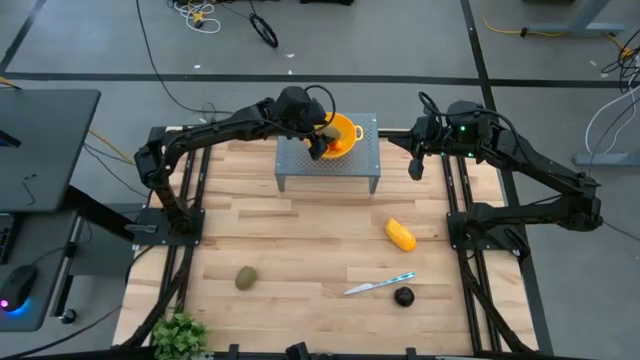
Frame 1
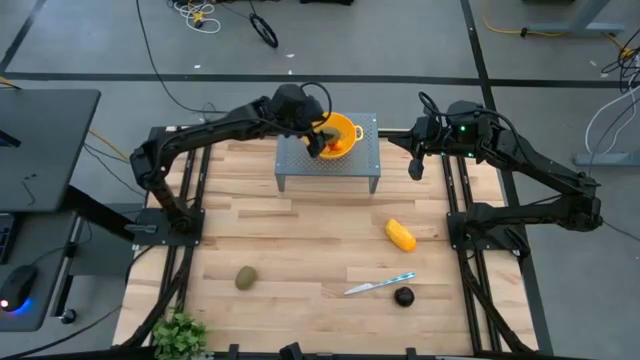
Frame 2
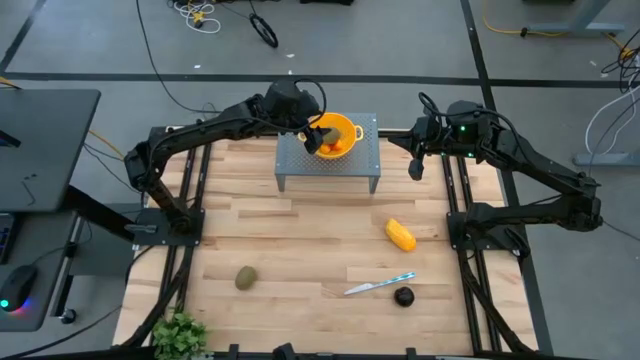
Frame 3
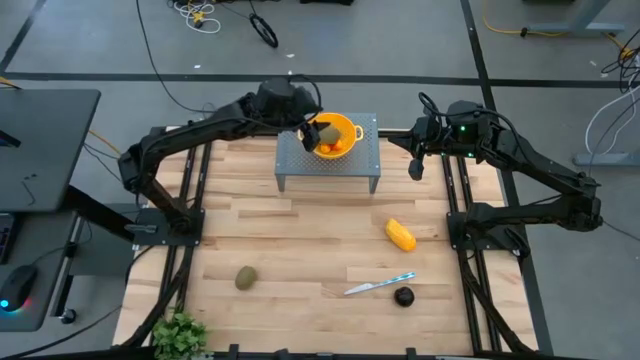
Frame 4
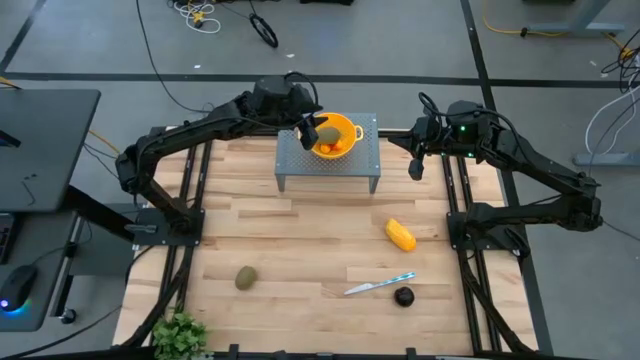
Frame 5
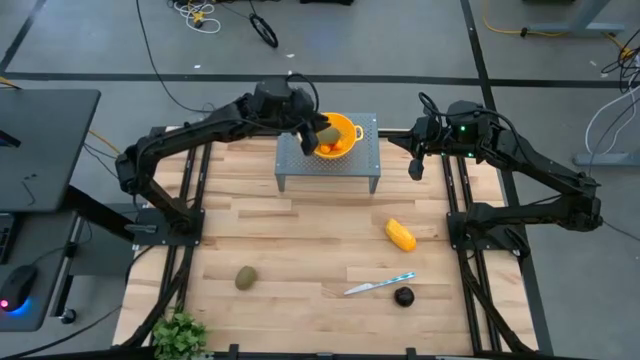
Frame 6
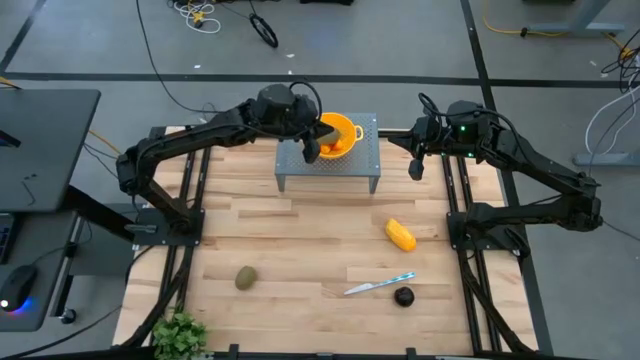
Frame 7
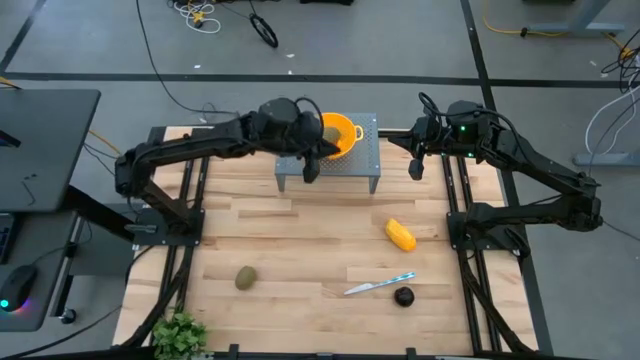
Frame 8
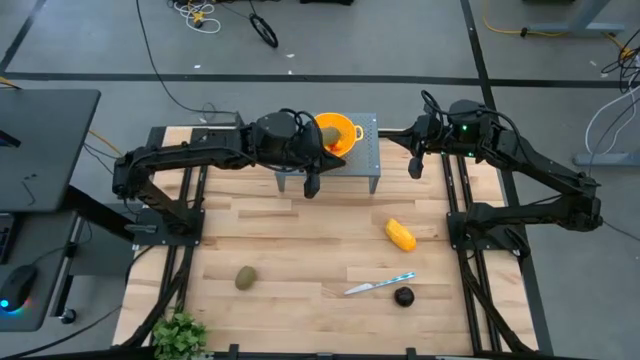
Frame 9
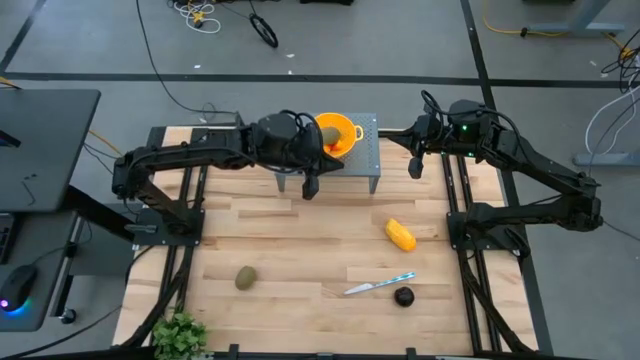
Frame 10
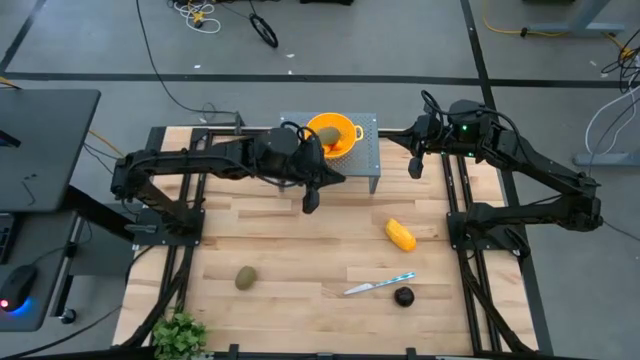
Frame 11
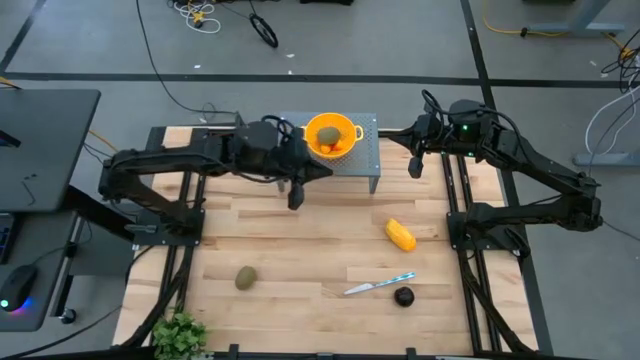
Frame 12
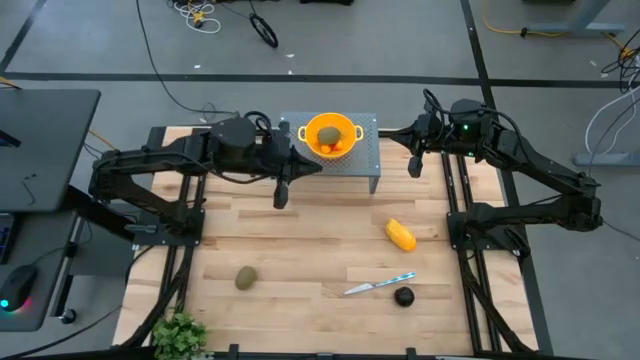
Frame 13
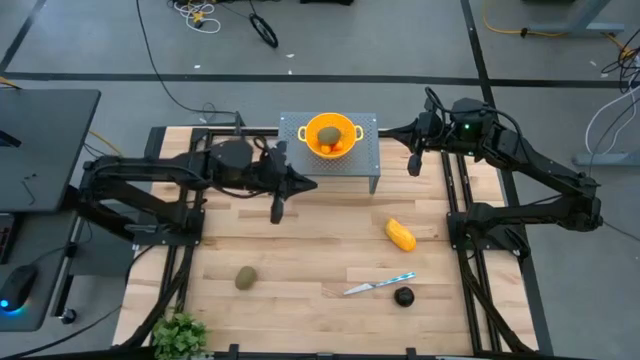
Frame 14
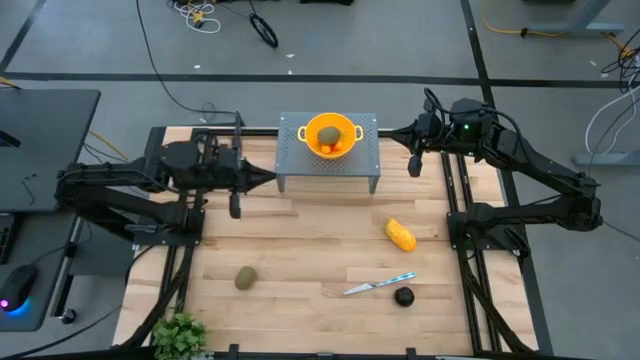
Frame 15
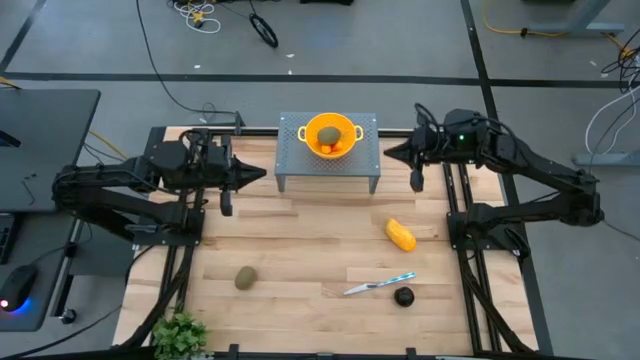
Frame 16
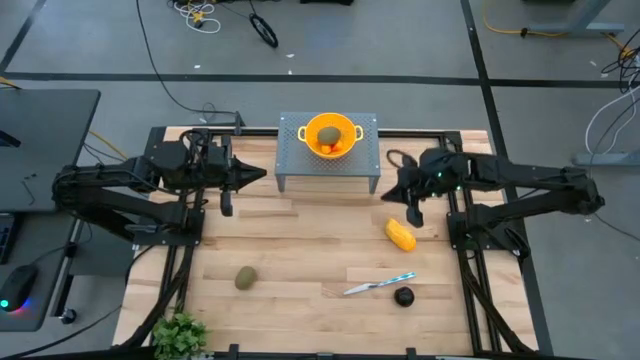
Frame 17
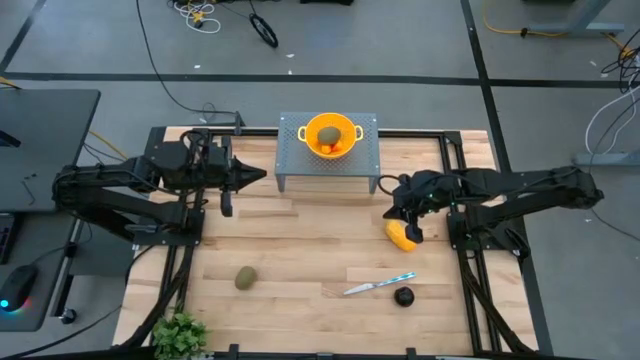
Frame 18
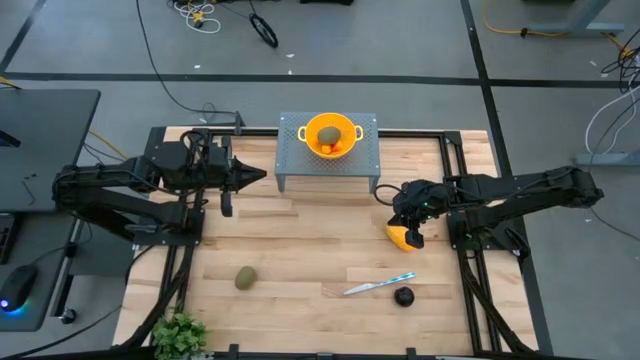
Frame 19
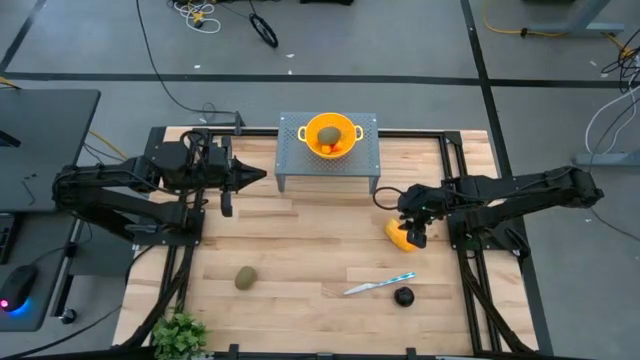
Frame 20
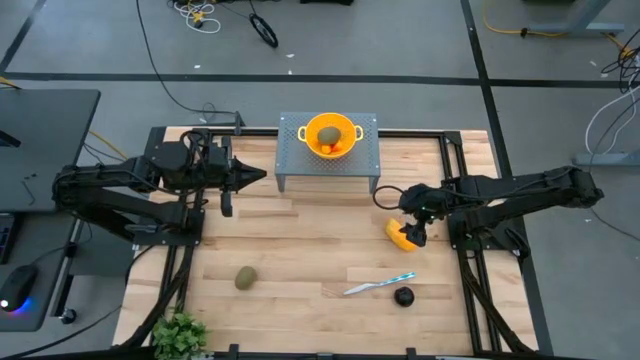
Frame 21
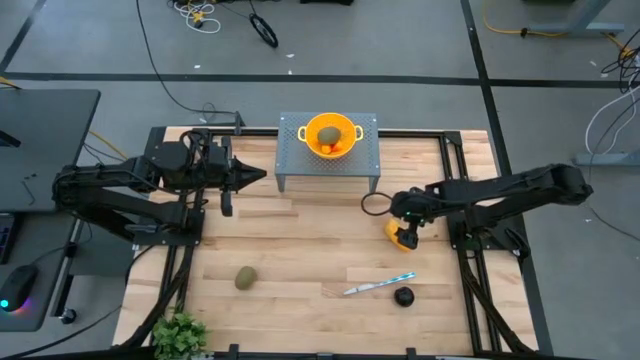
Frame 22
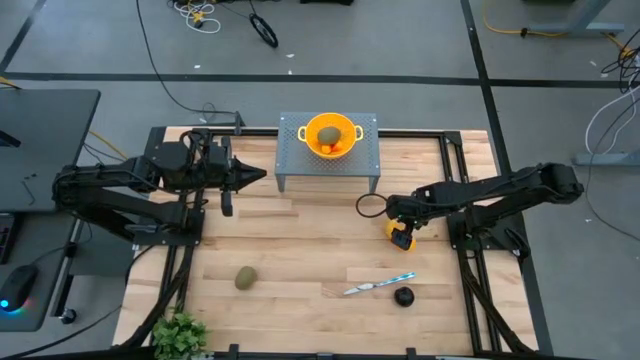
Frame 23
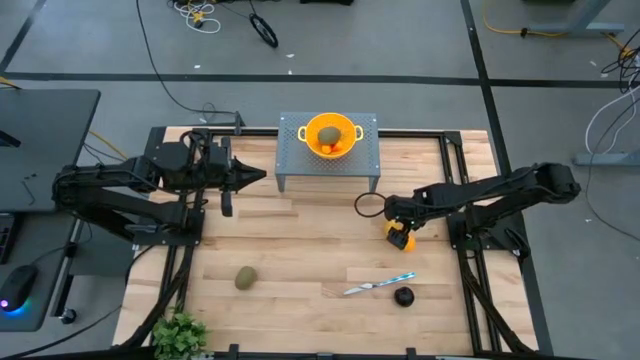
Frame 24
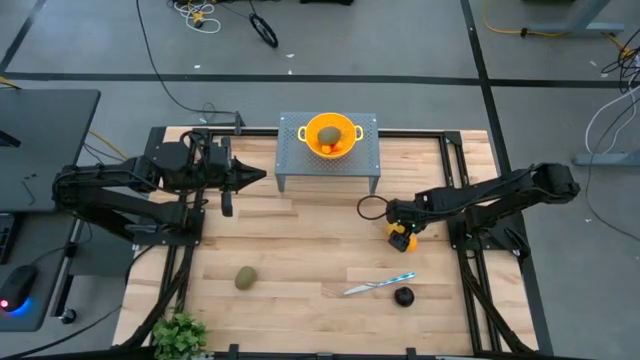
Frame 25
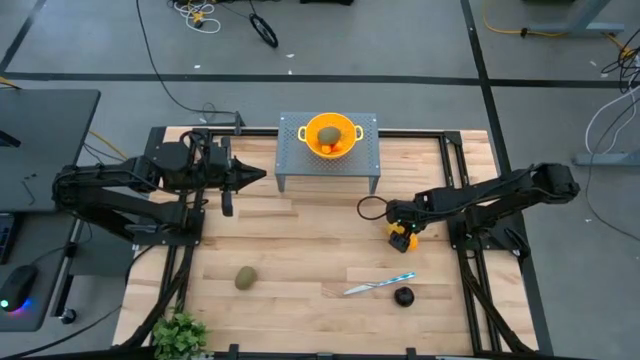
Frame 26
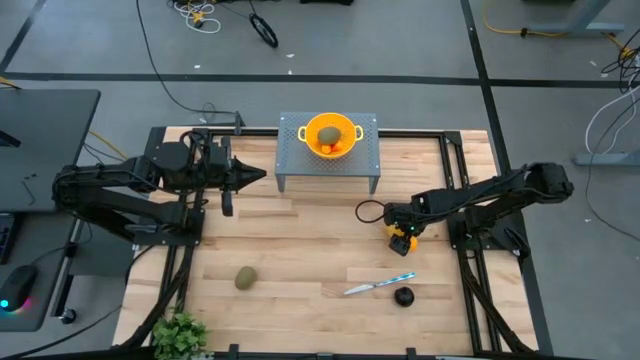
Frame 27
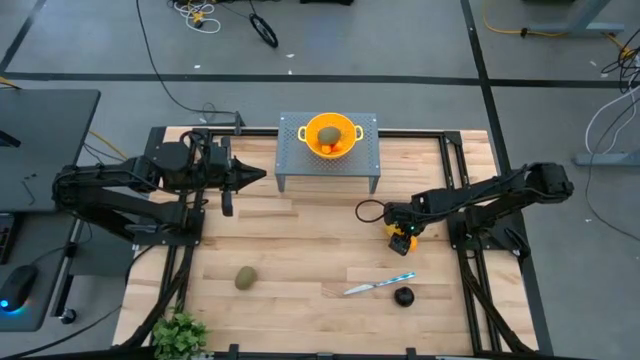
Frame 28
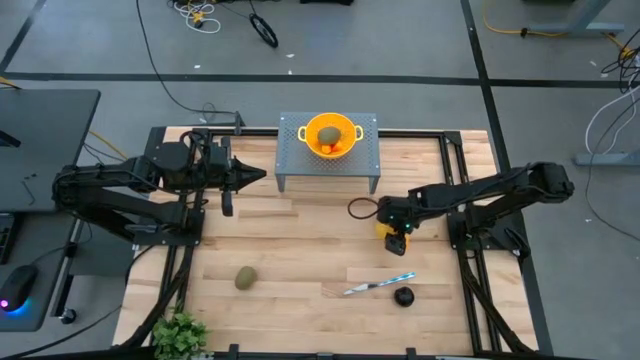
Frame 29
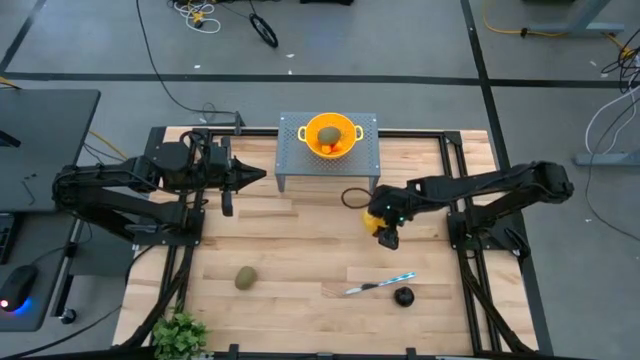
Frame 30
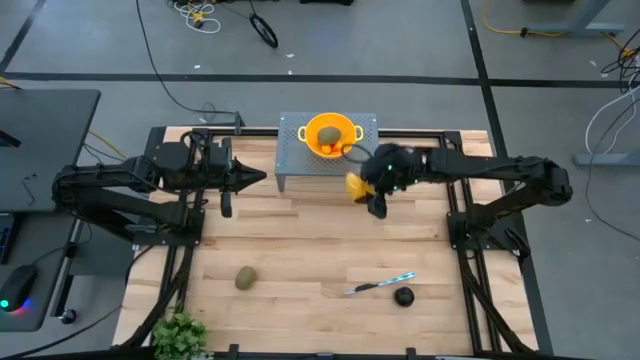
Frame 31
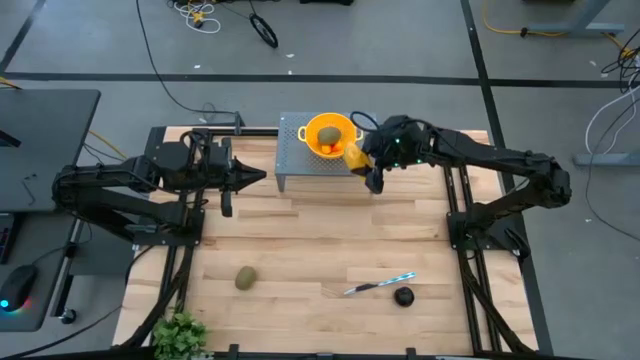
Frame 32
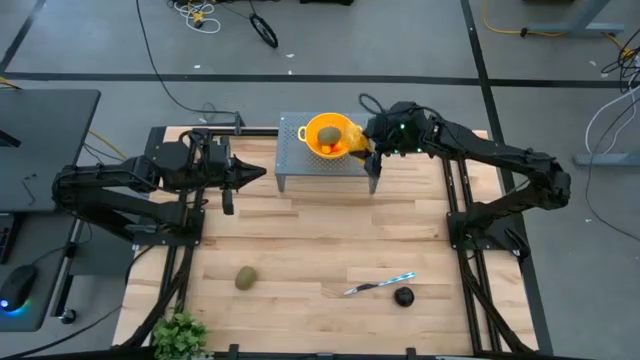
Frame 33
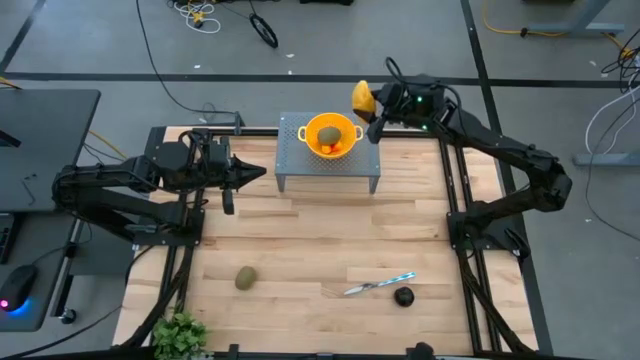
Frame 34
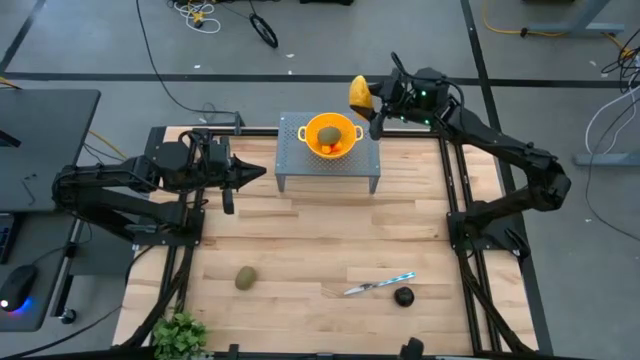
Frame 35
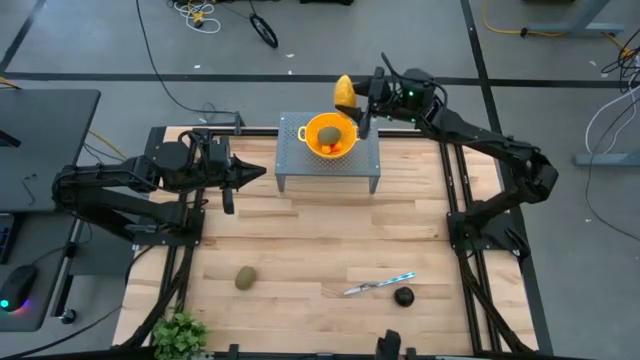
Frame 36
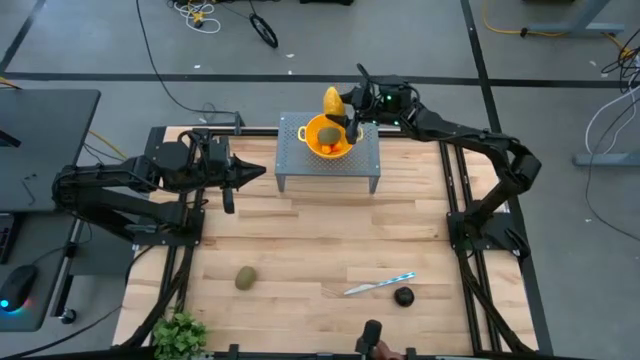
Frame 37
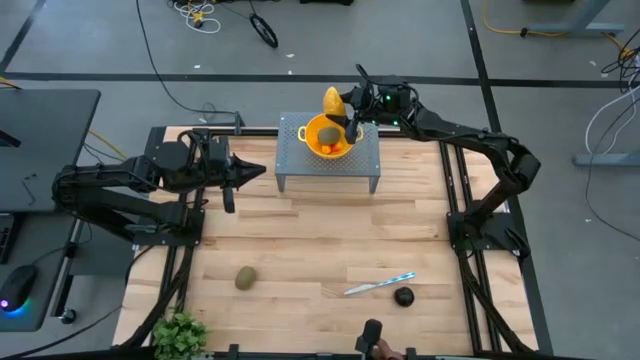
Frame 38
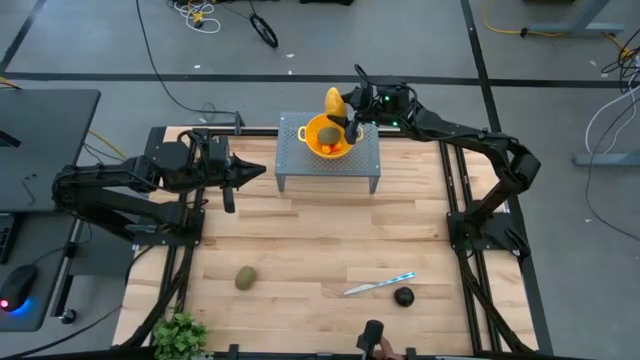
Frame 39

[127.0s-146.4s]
Task: Pick & Place Fruit
Put the yellow mango into the yellow strainer bowl on the shelf
